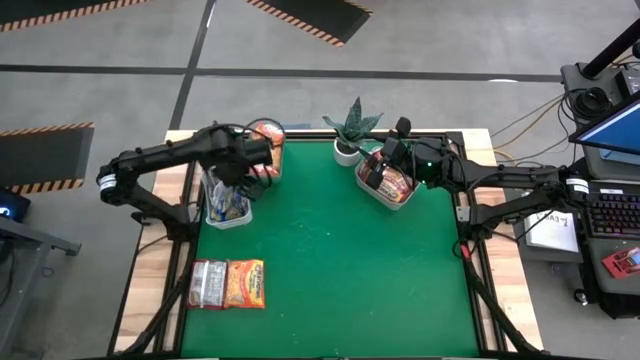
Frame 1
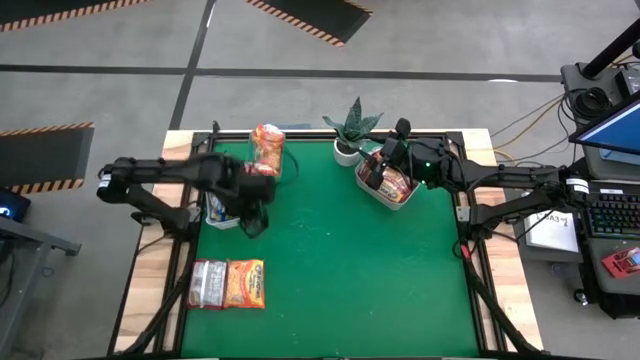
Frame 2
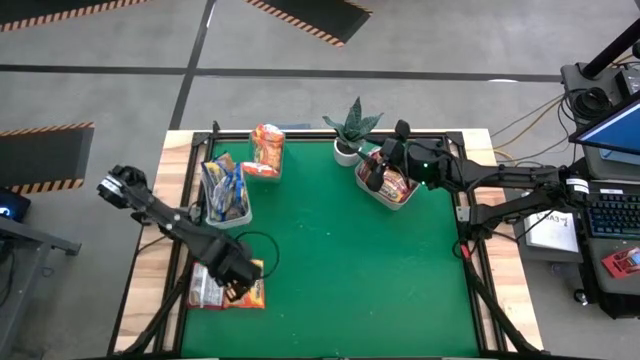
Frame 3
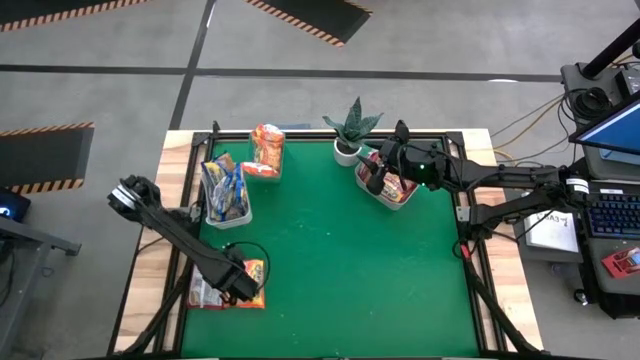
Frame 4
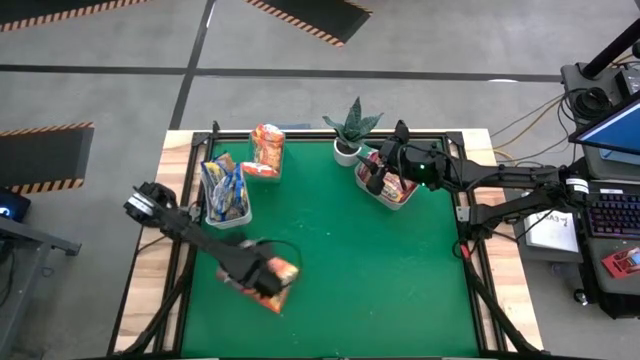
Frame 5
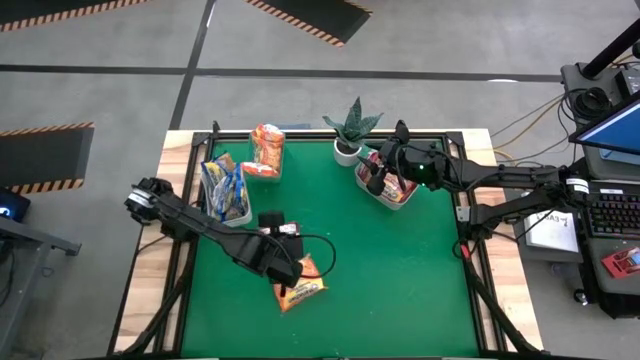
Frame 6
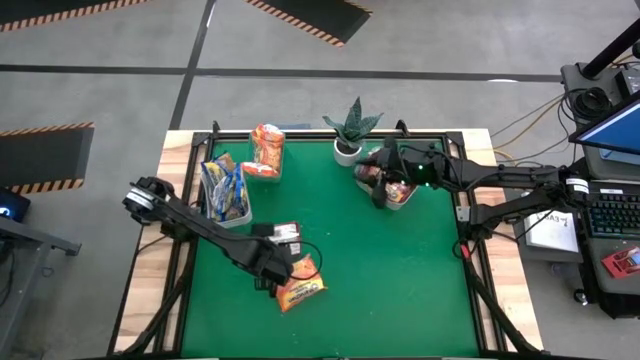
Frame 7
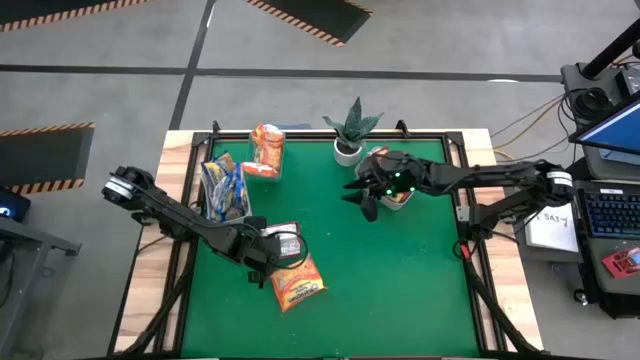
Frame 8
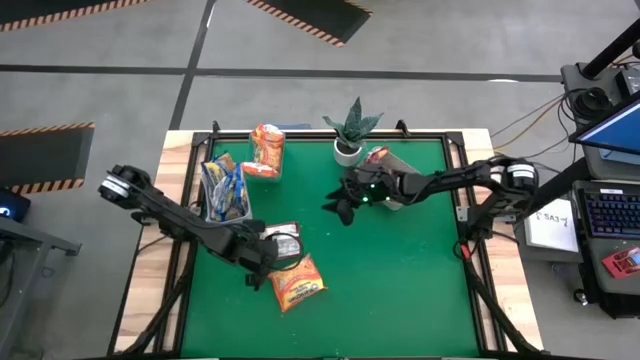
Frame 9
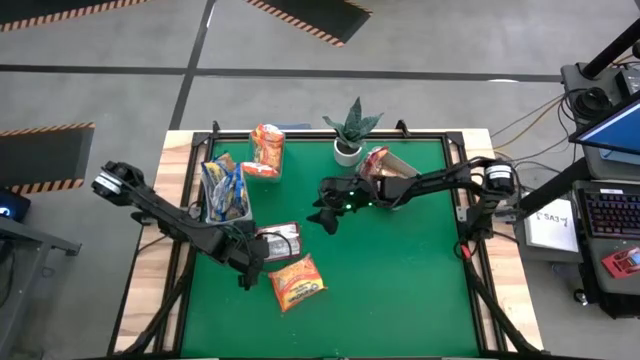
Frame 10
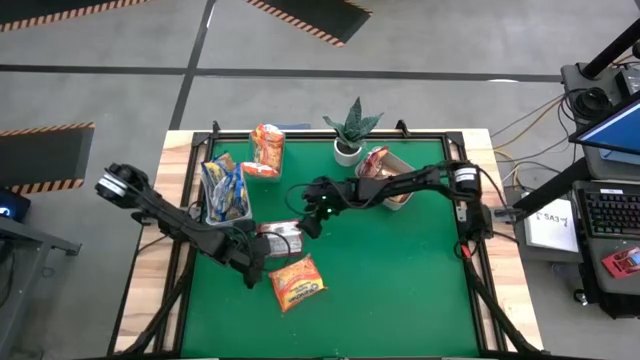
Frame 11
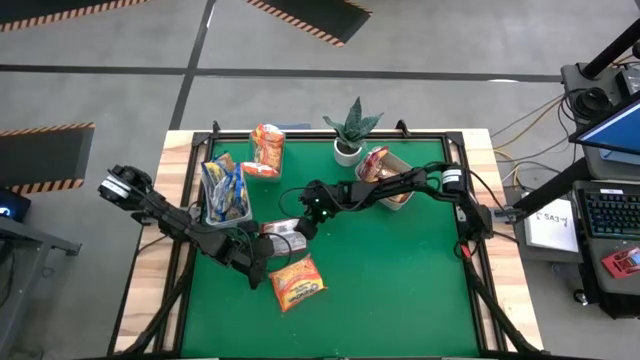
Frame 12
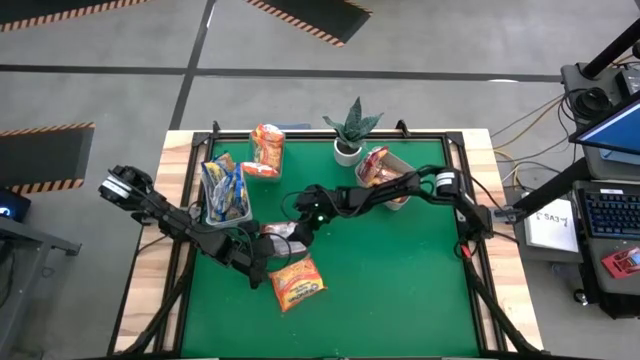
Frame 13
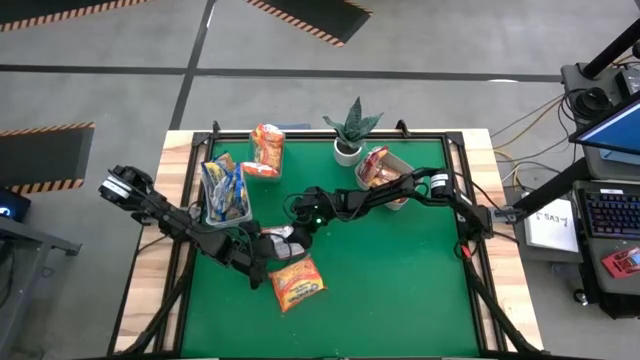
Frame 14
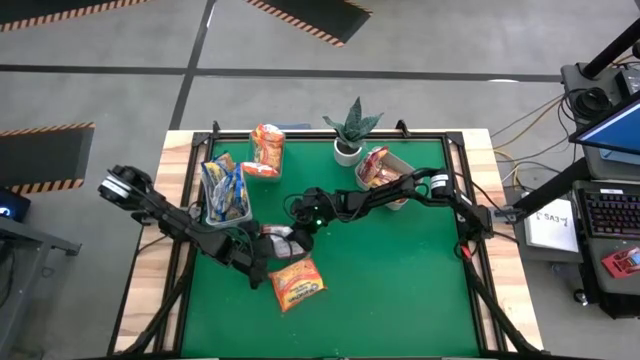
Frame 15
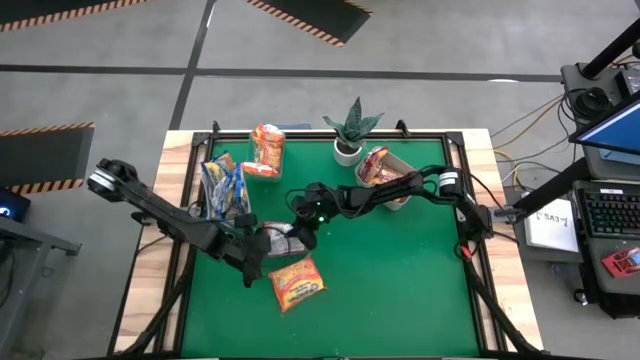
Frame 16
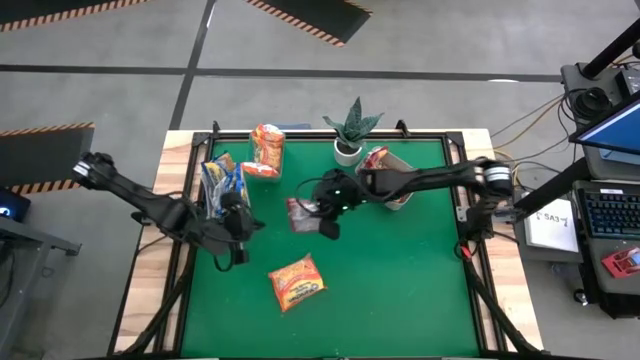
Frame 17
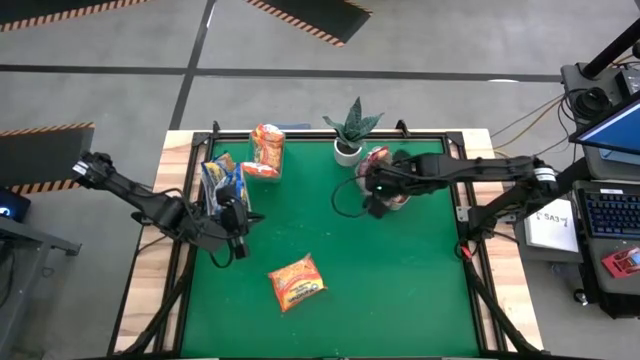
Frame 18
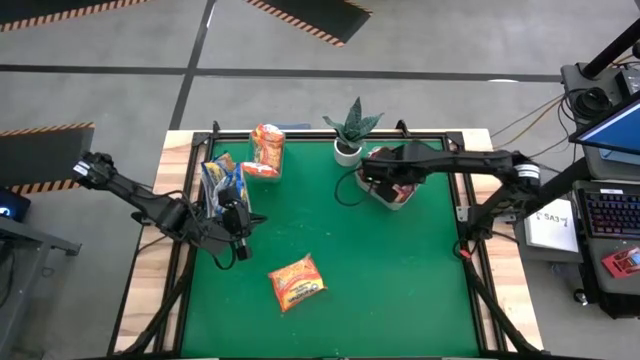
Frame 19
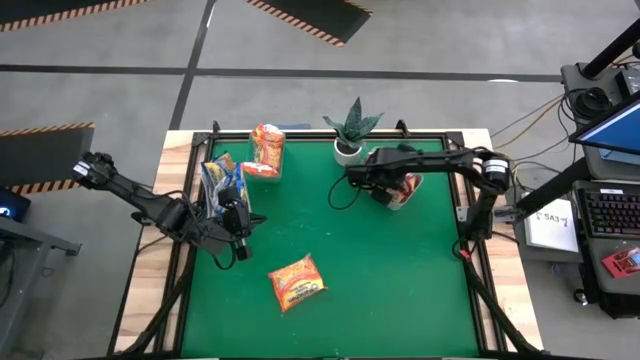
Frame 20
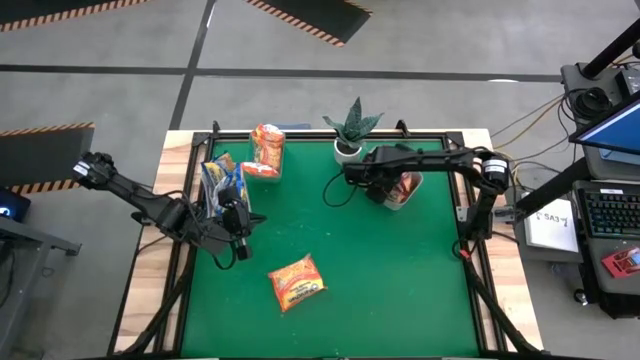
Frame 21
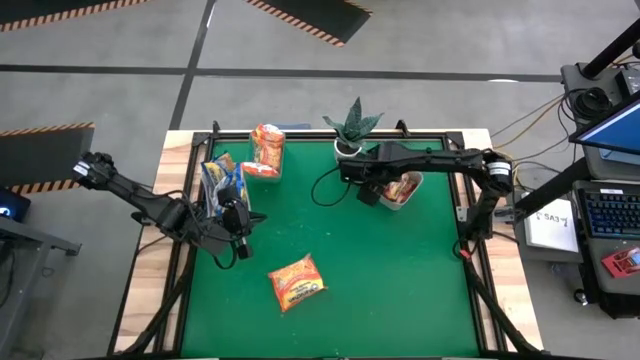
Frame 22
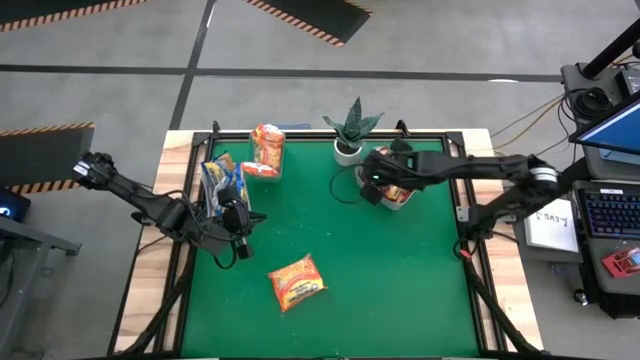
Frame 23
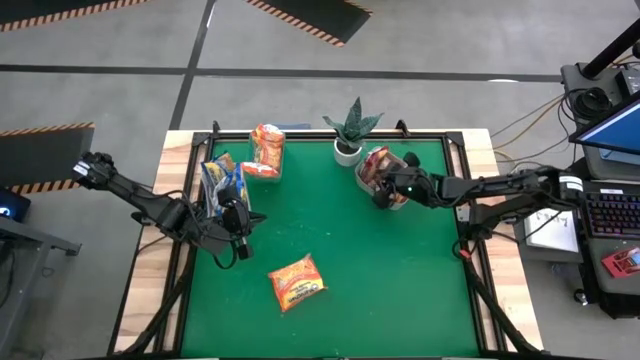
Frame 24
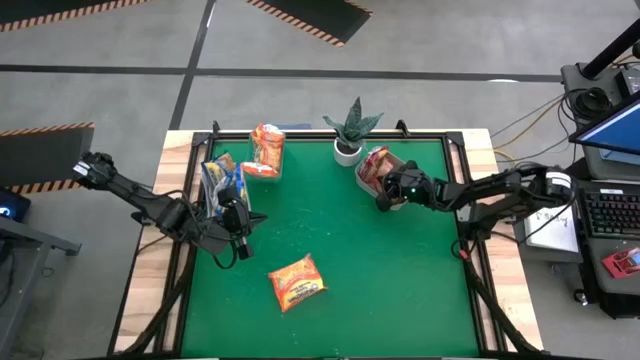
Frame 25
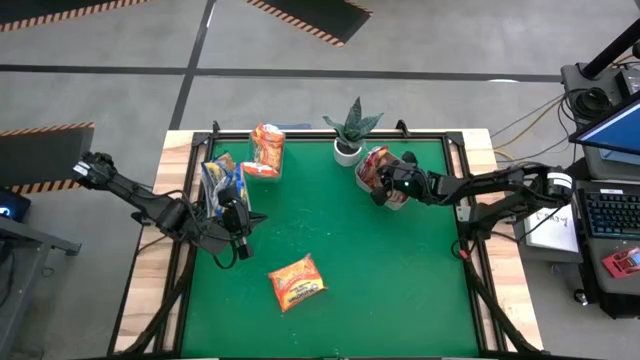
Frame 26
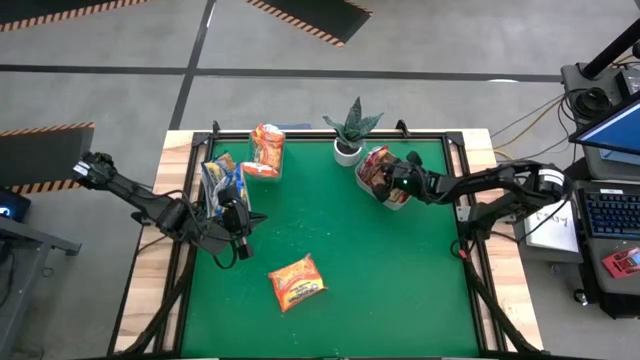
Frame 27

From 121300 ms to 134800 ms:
Task: Sort Maruchan noodles
Put the red noodle pack into the gray bin

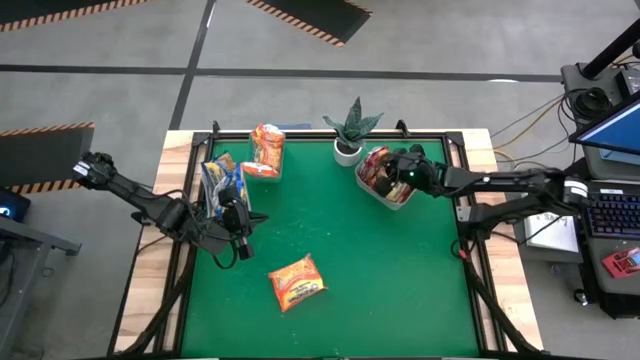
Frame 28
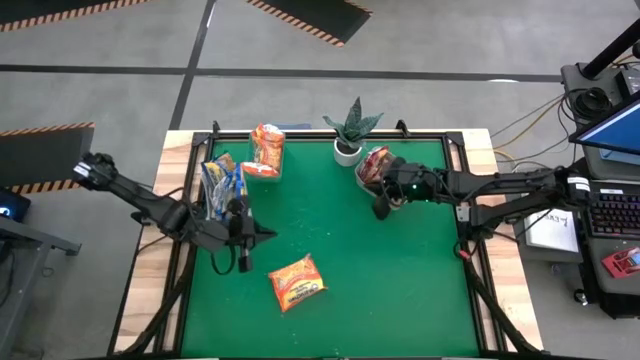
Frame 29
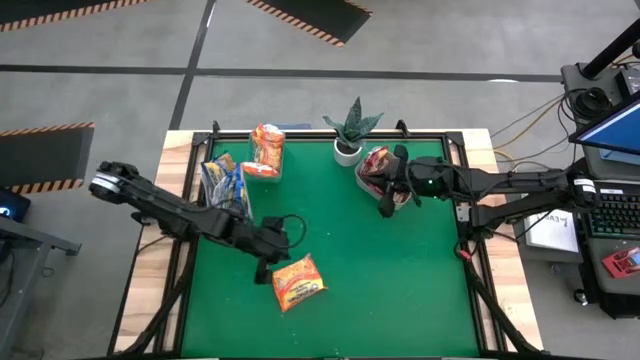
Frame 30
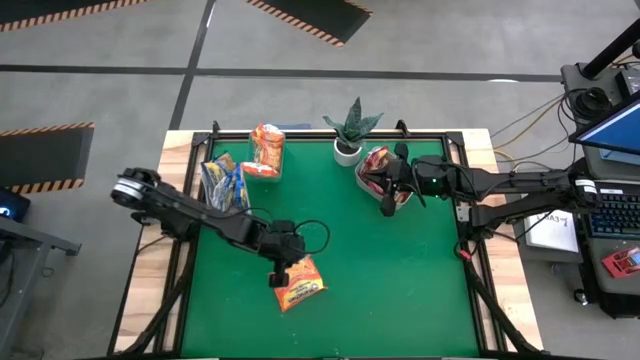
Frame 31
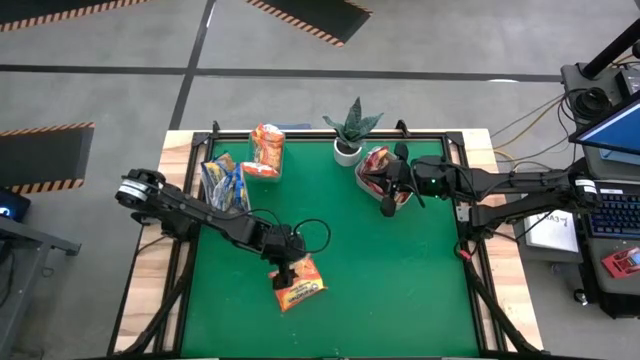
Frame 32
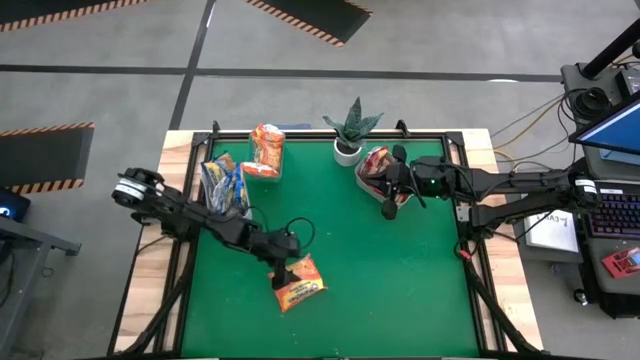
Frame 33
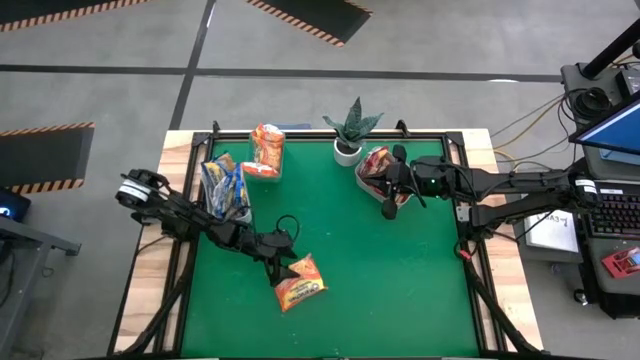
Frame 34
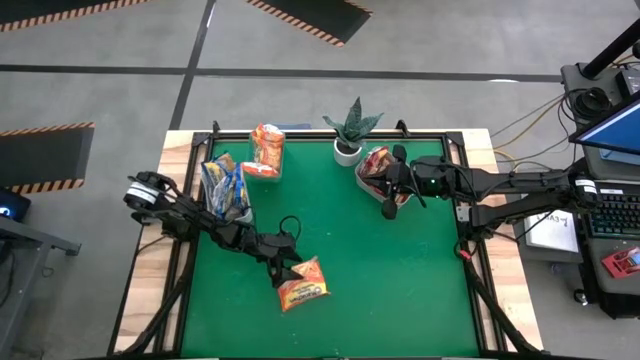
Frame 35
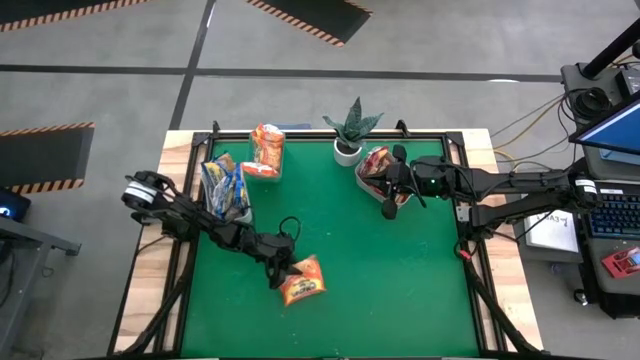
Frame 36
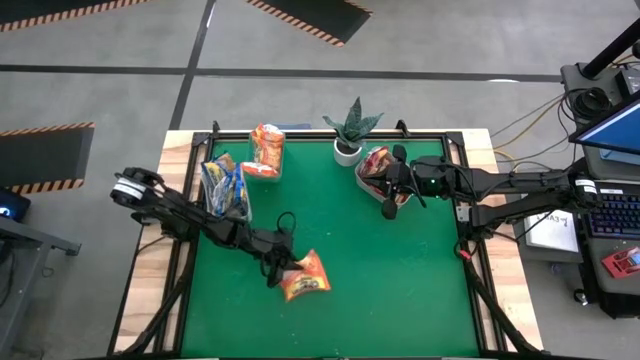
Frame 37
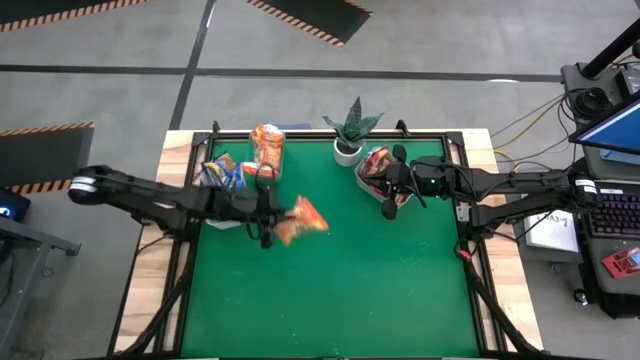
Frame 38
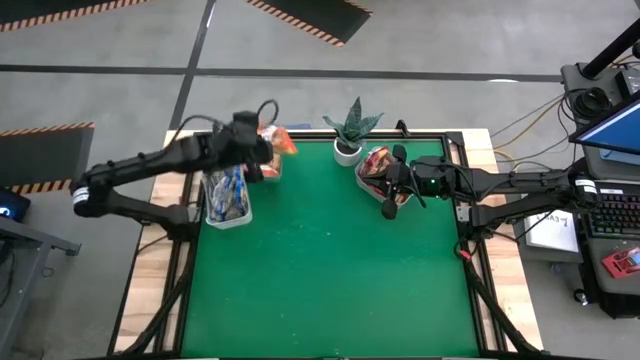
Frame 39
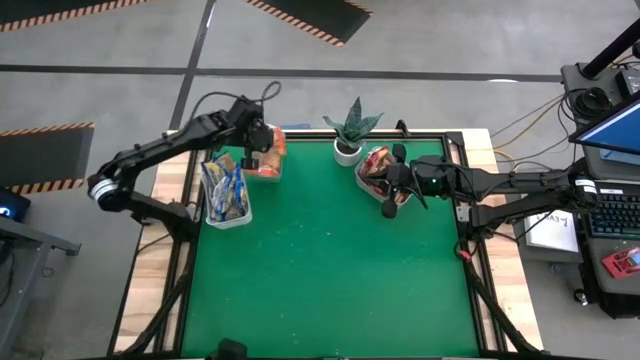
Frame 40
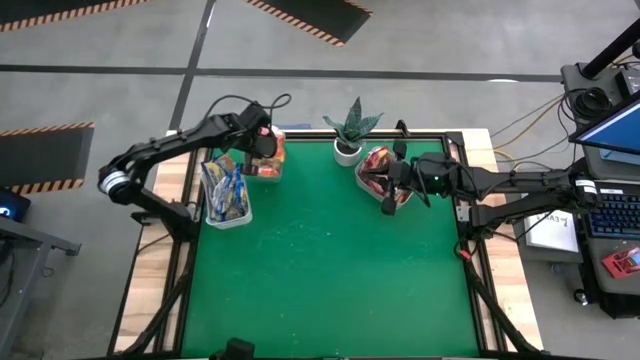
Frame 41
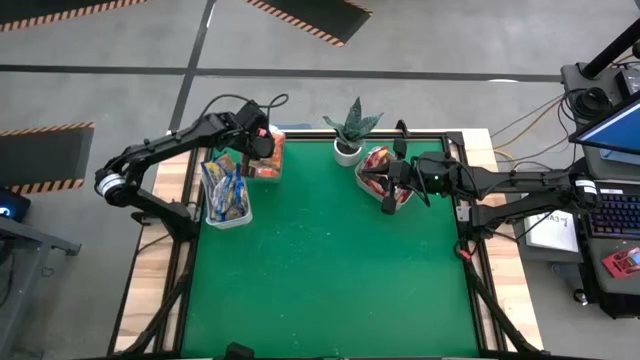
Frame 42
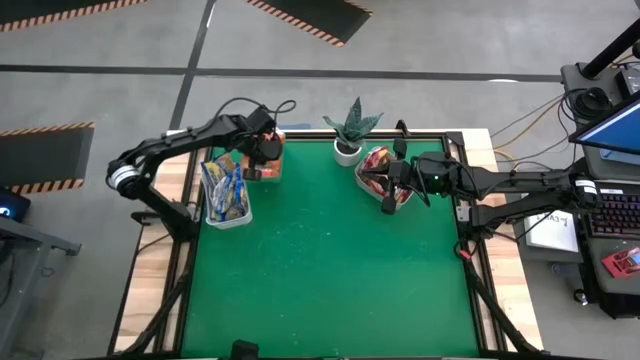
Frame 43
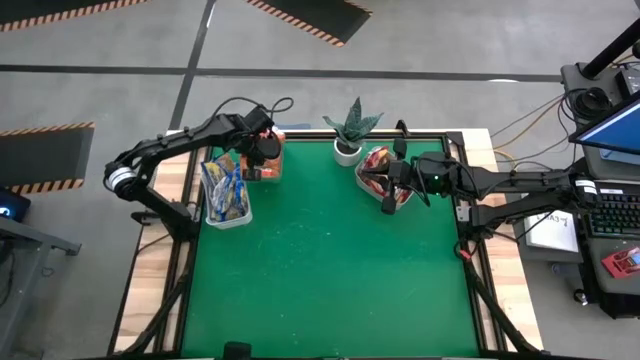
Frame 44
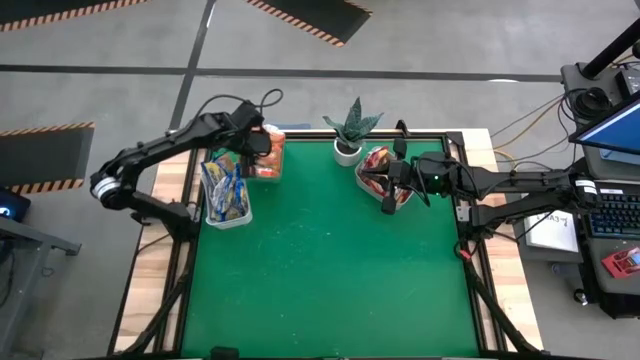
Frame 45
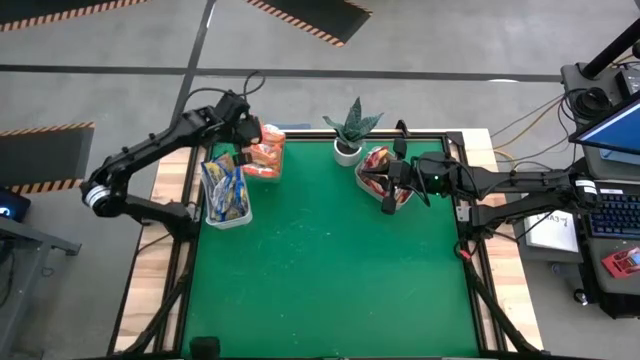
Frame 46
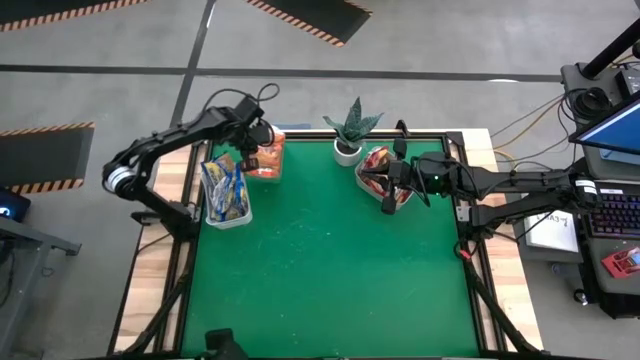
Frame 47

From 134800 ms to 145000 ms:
Put the orange noodle pack into the green bin
